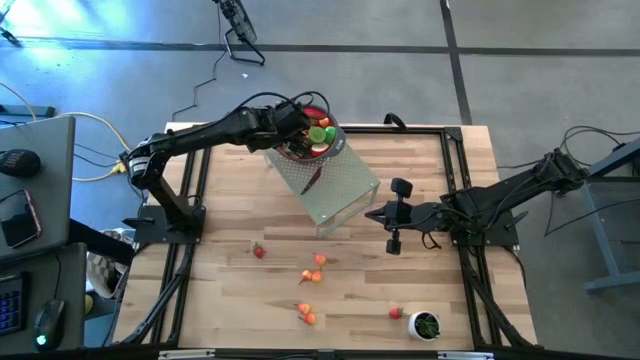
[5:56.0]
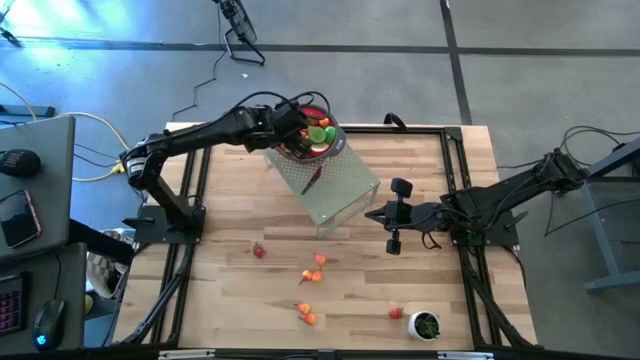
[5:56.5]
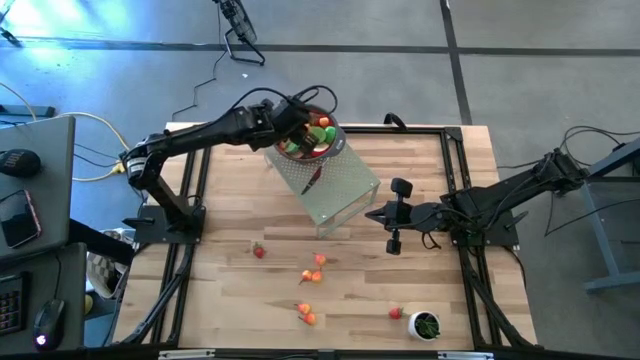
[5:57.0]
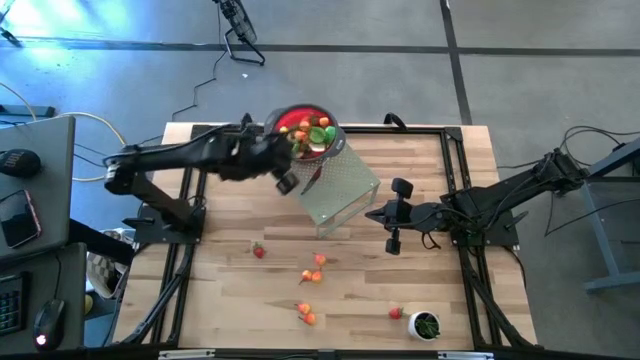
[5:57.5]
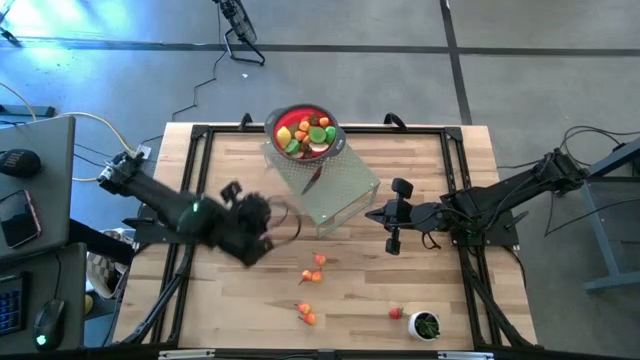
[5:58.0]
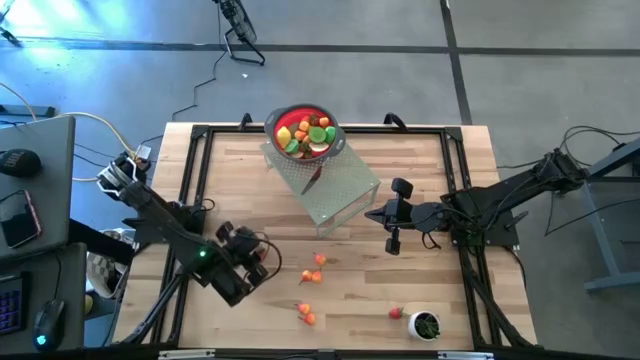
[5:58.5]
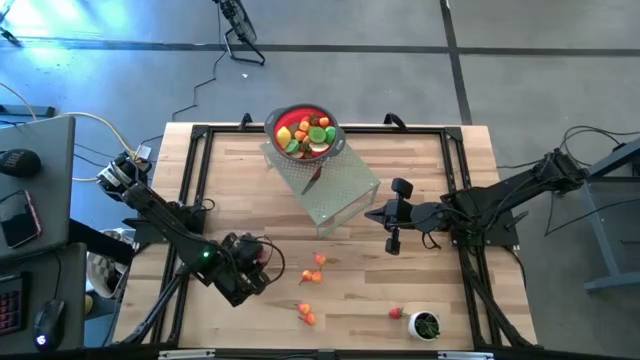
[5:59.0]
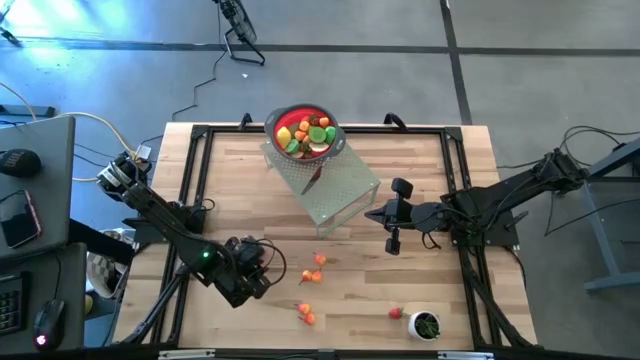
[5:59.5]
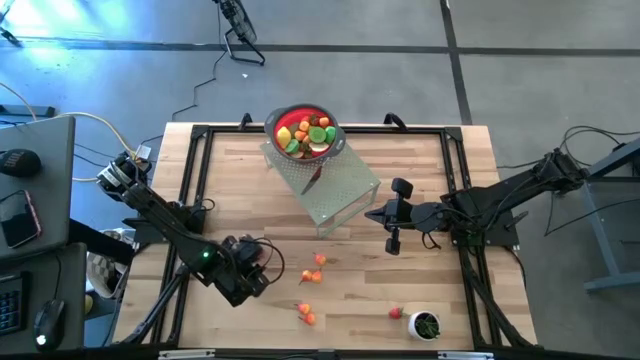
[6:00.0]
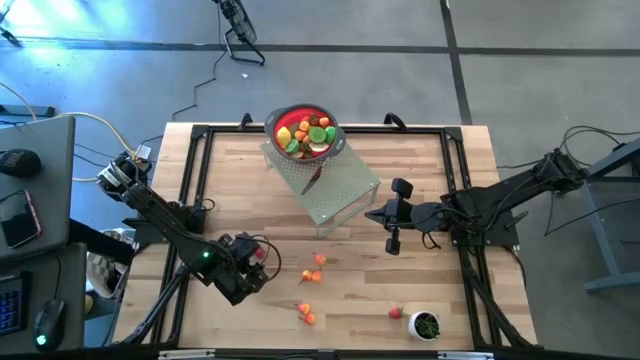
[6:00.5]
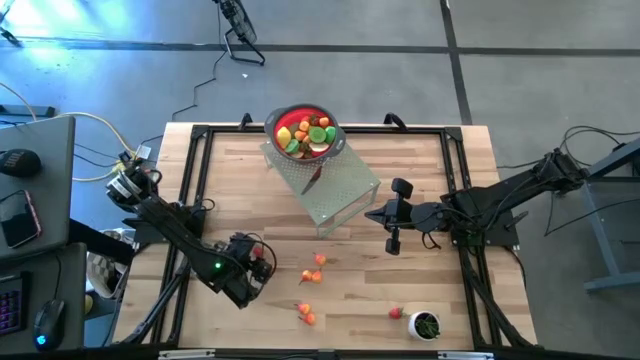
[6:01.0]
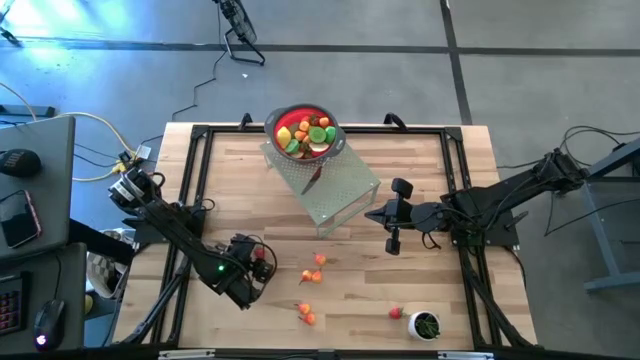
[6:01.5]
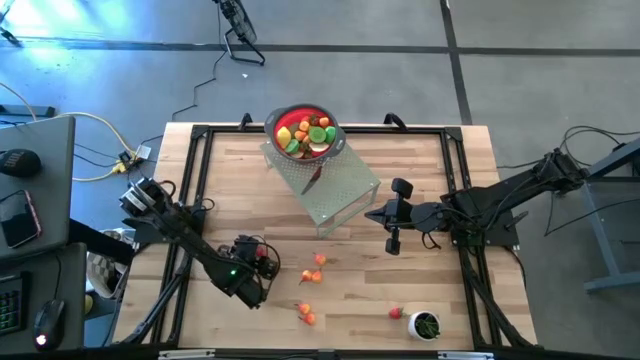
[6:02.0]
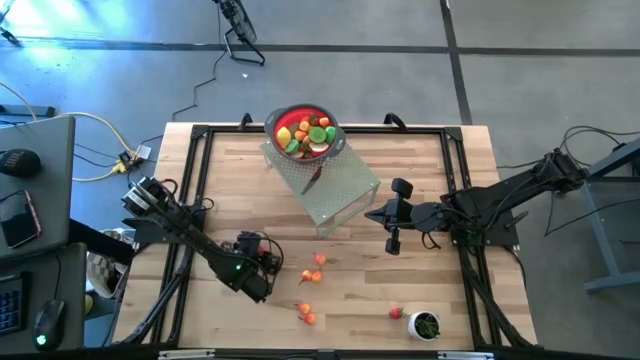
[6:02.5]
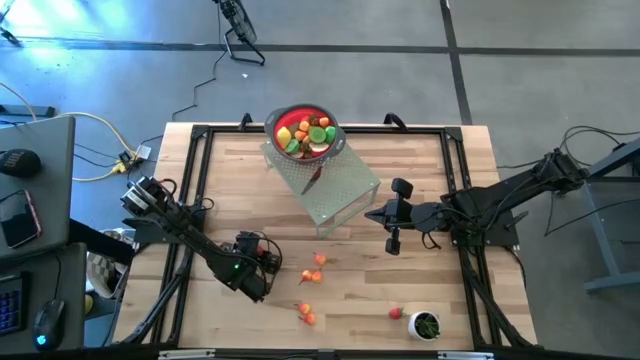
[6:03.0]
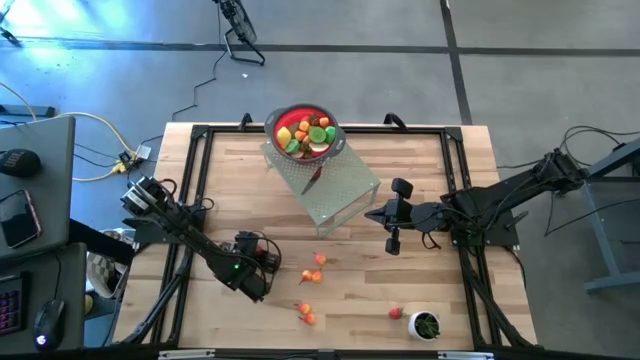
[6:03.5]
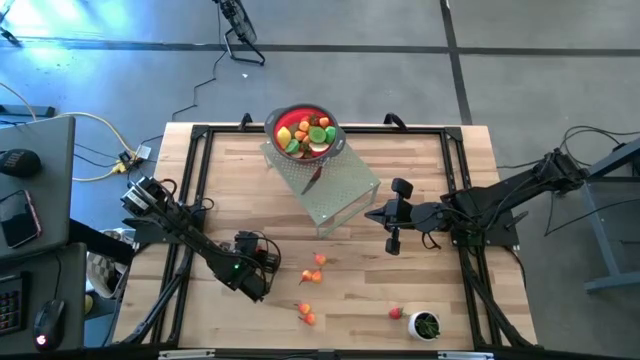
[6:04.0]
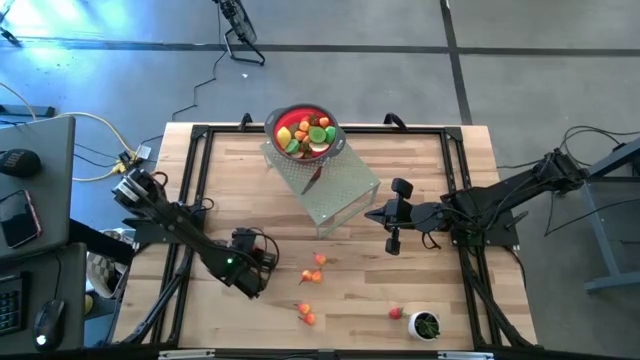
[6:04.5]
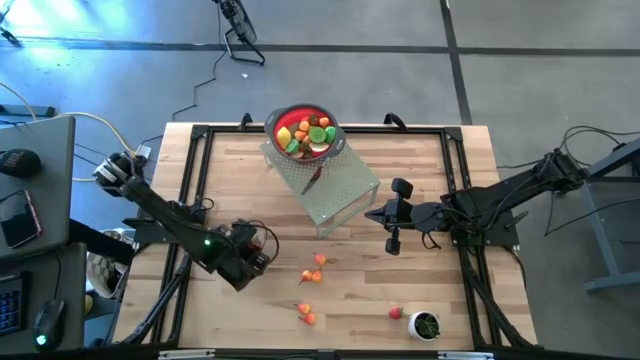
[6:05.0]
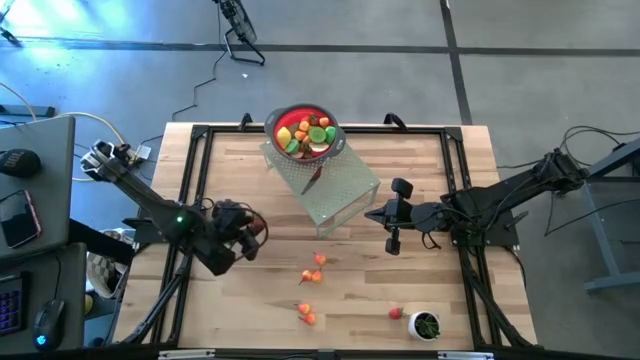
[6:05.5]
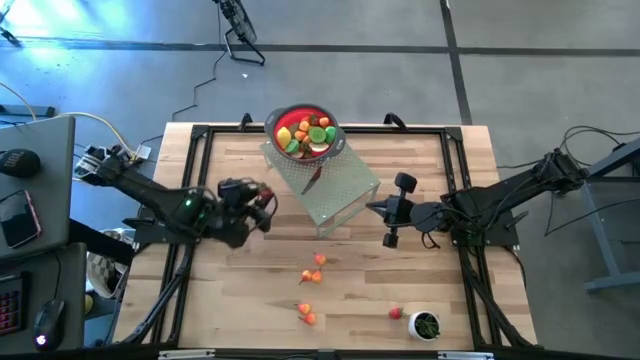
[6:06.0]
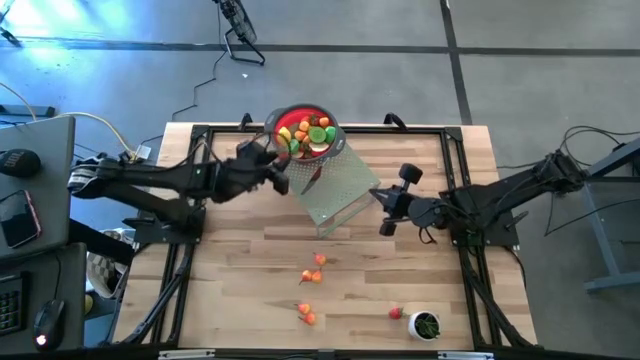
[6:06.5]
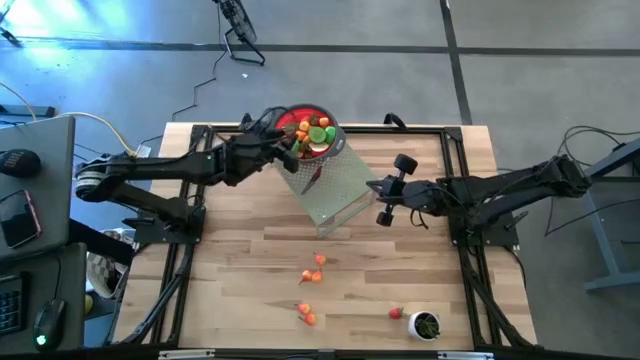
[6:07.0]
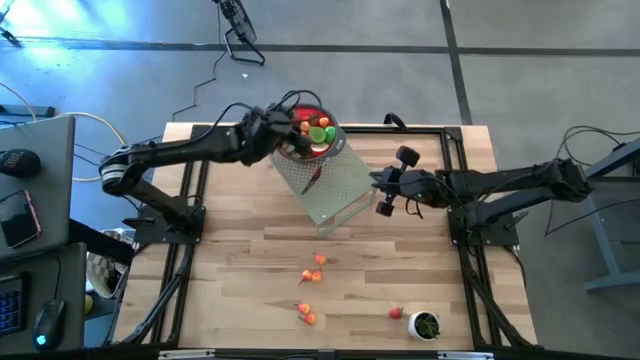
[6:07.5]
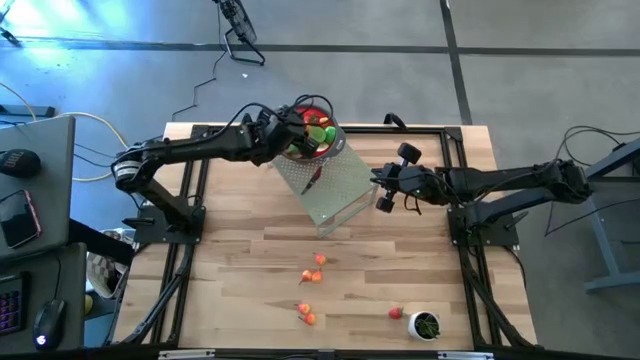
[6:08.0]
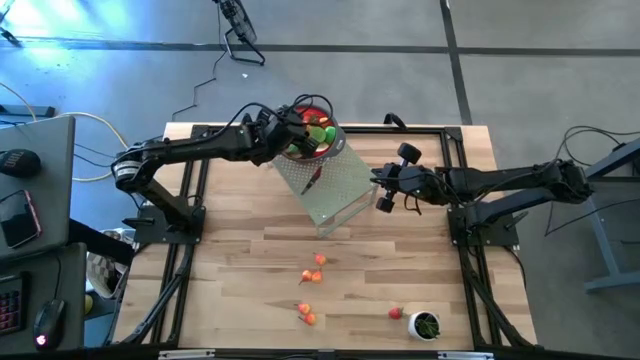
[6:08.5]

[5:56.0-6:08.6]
Task: Pick & Place Fruit
Put the strawberry into the red strainer on the shelf

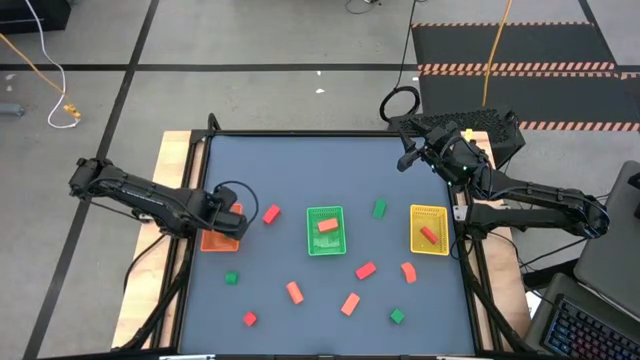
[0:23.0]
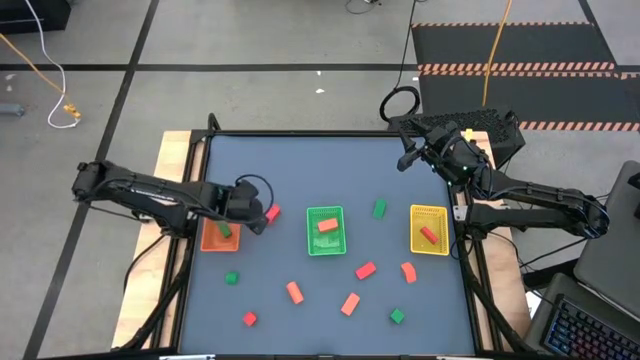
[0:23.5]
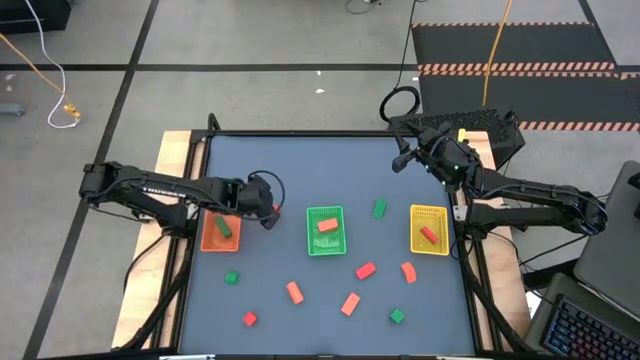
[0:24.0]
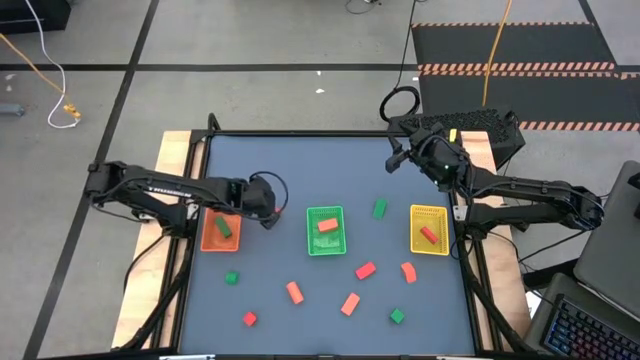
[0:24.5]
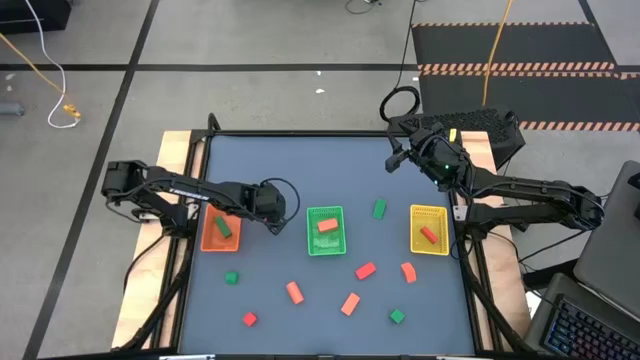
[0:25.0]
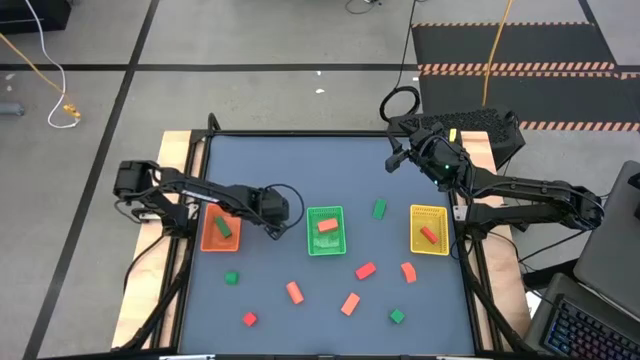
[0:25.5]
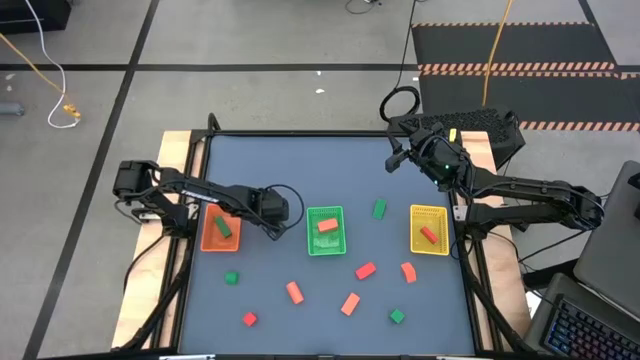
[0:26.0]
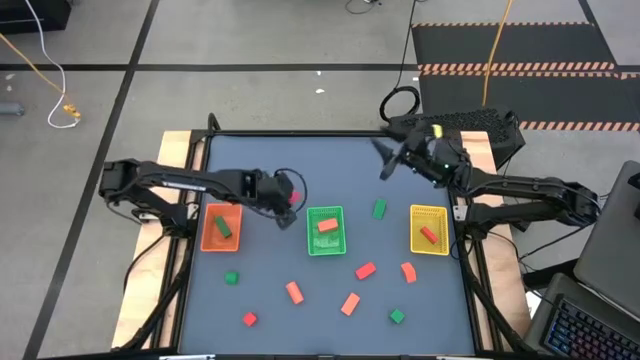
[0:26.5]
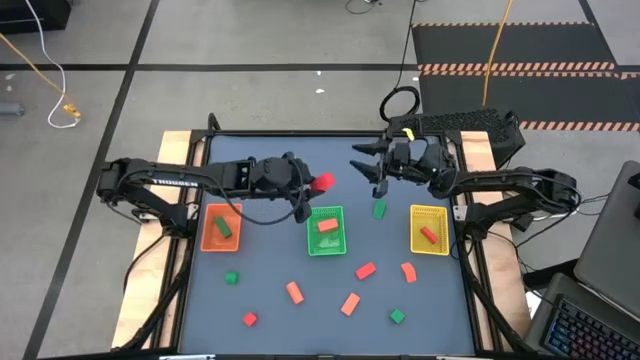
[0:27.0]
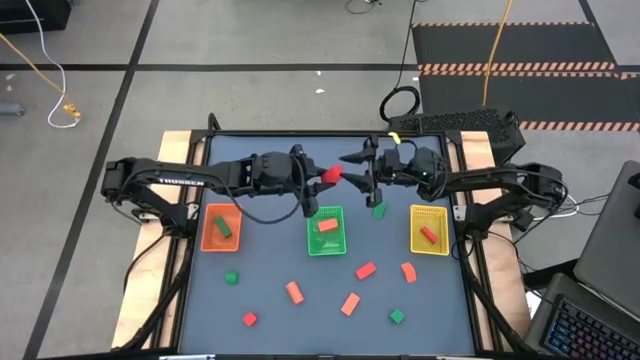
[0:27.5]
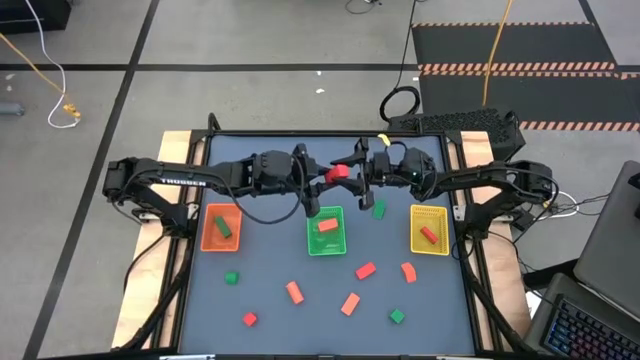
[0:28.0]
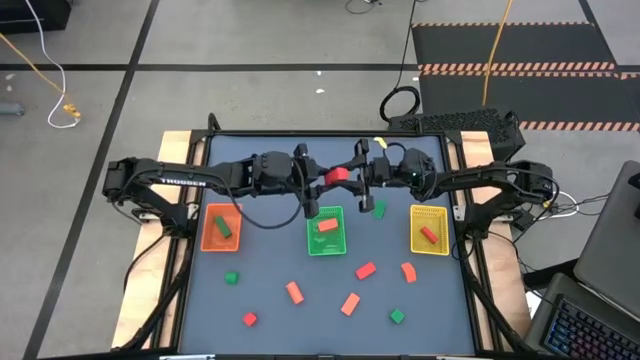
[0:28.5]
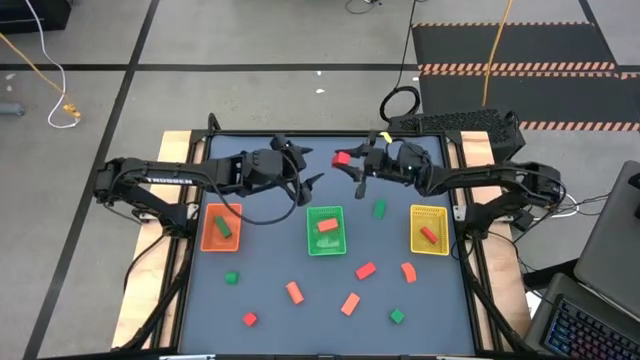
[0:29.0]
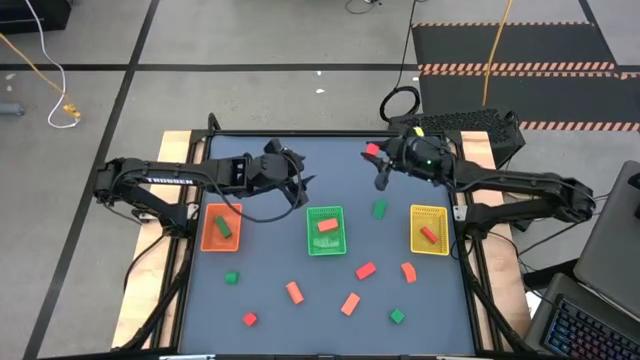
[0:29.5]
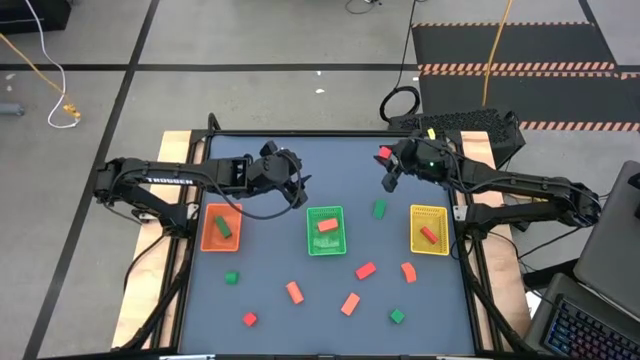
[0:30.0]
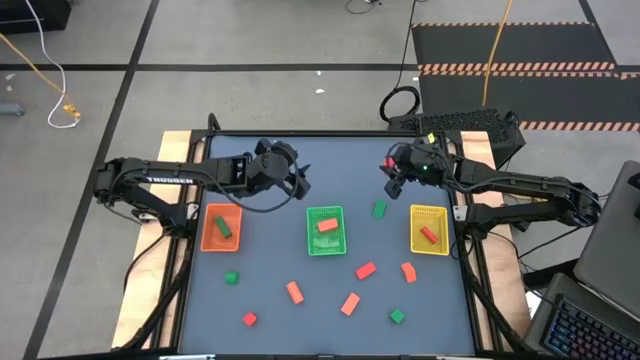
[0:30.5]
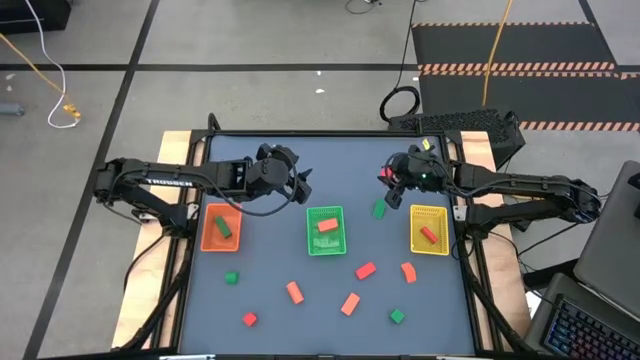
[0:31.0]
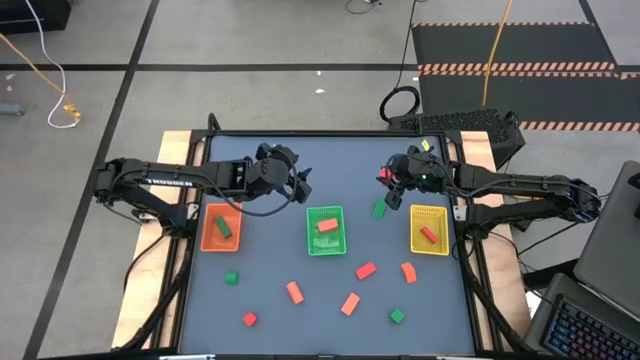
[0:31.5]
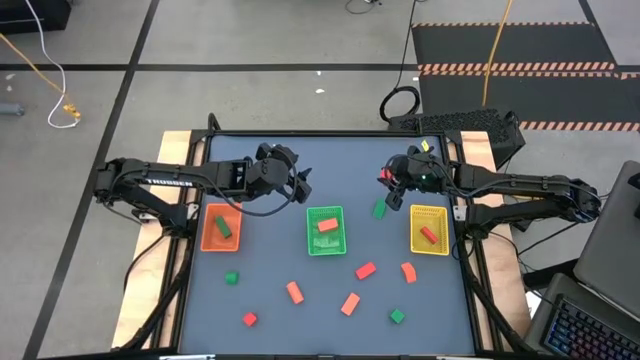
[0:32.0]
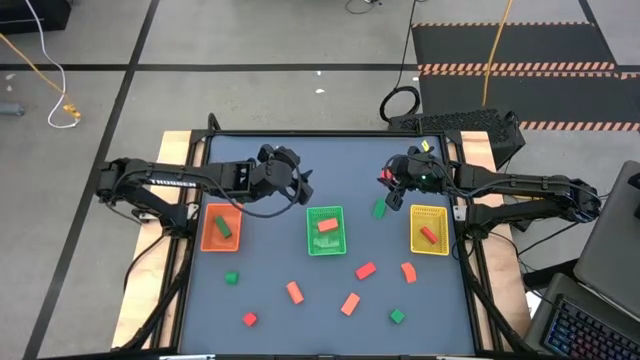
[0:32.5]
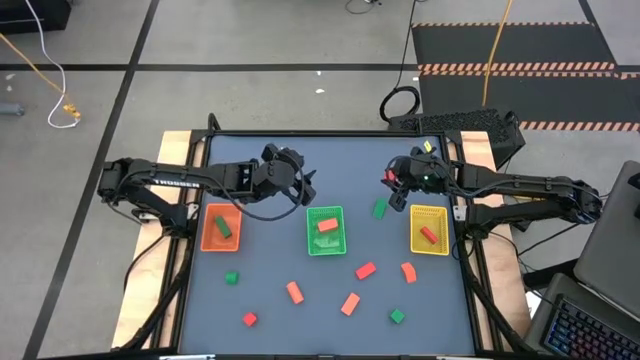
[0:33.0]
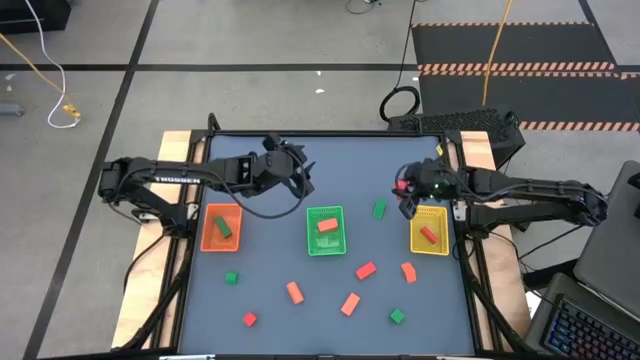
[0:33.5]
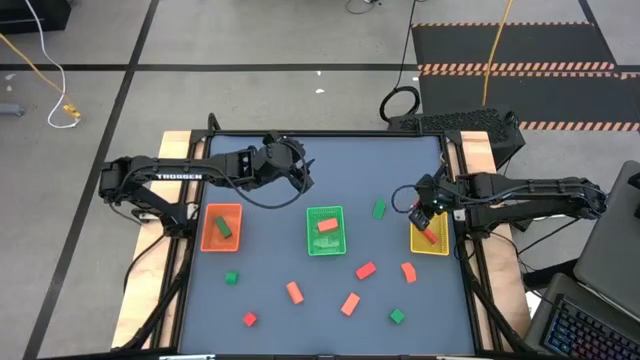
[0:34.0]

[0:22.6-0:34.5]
Task: Sort & place blocks by color
Put the red block into the yellow bin
